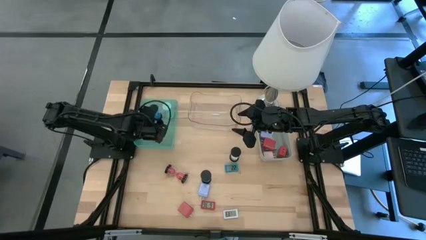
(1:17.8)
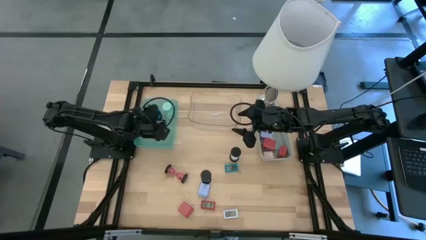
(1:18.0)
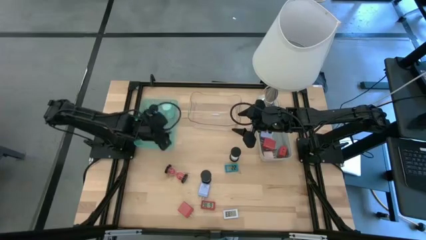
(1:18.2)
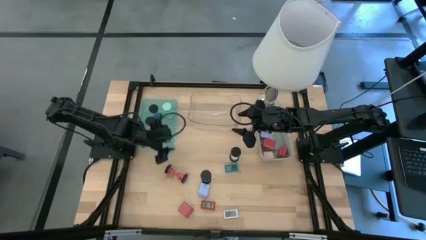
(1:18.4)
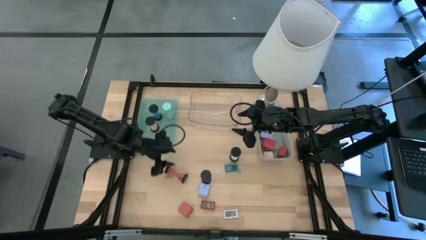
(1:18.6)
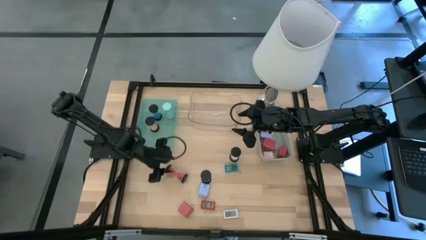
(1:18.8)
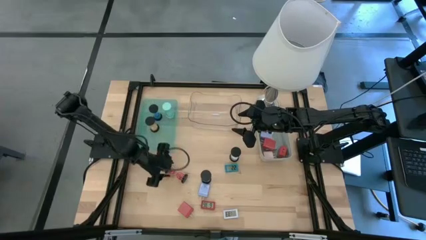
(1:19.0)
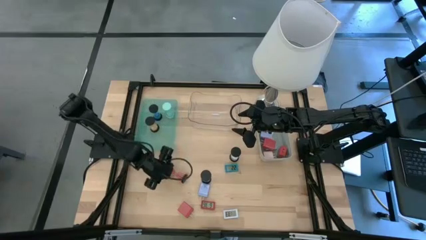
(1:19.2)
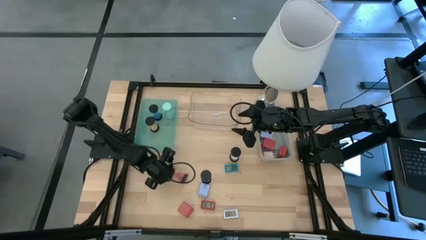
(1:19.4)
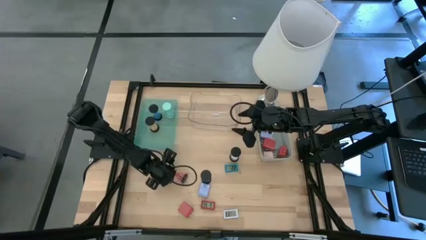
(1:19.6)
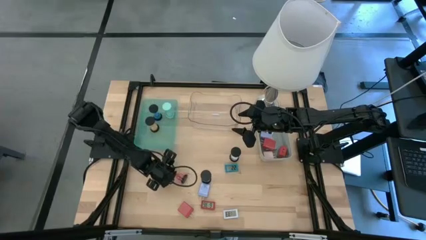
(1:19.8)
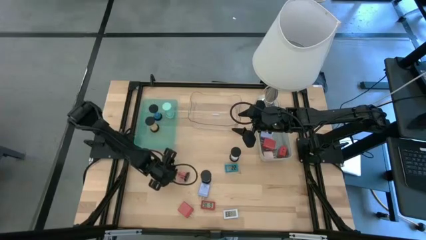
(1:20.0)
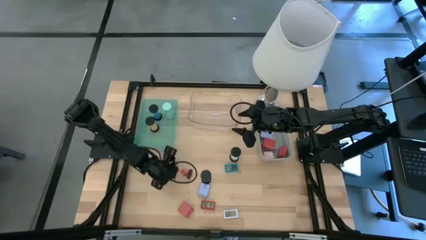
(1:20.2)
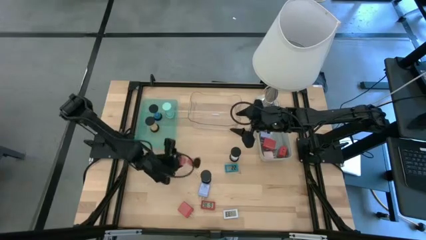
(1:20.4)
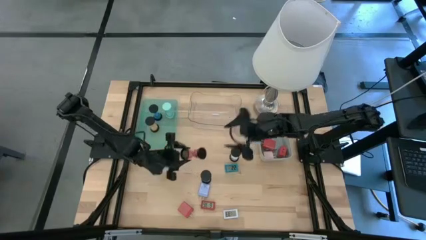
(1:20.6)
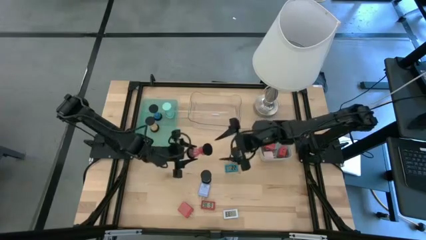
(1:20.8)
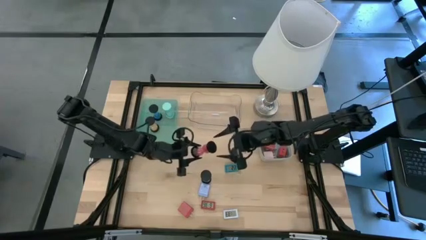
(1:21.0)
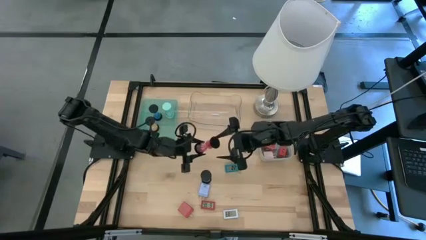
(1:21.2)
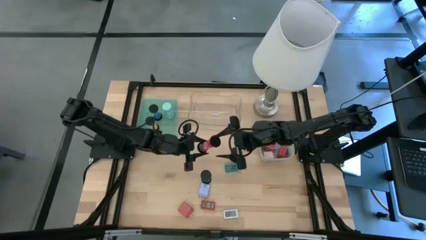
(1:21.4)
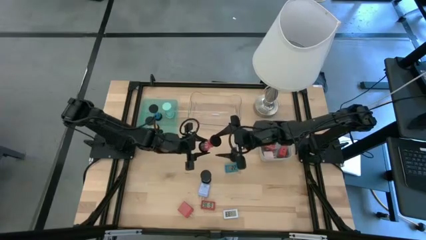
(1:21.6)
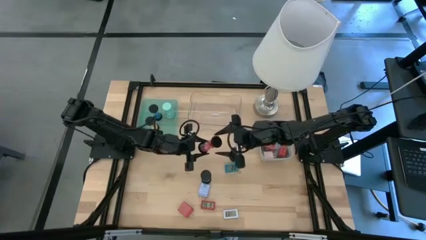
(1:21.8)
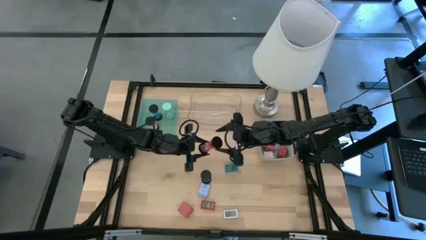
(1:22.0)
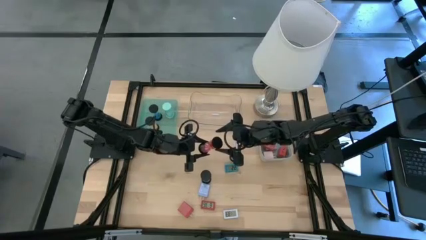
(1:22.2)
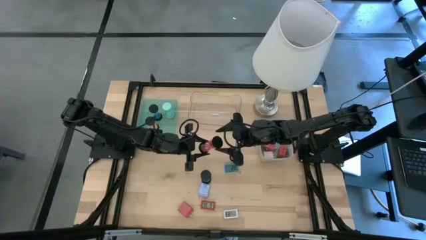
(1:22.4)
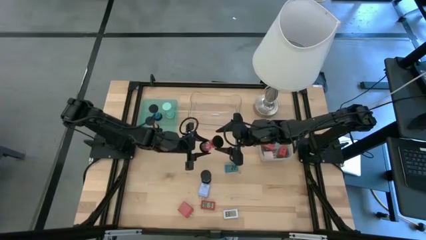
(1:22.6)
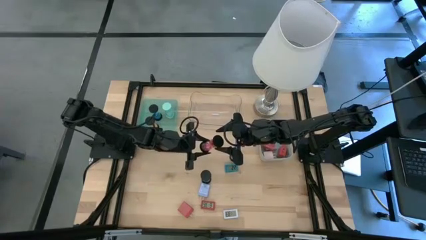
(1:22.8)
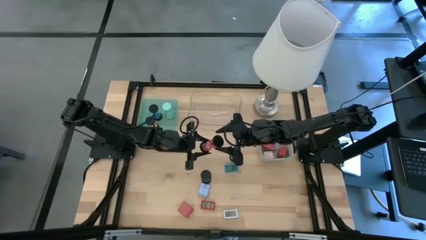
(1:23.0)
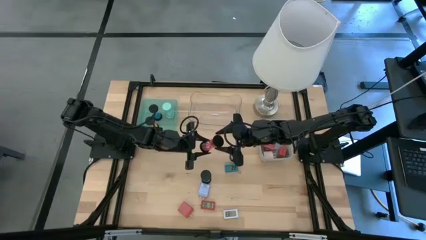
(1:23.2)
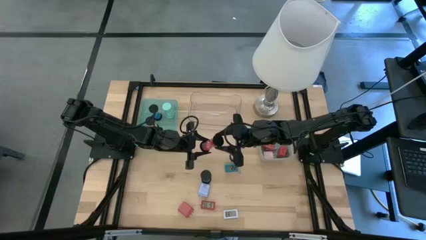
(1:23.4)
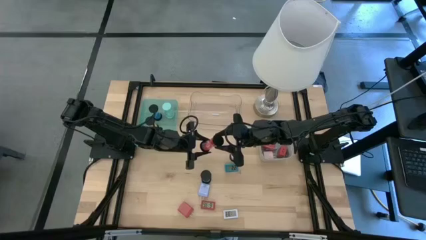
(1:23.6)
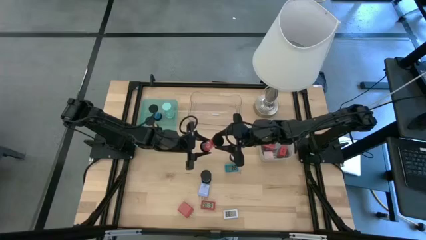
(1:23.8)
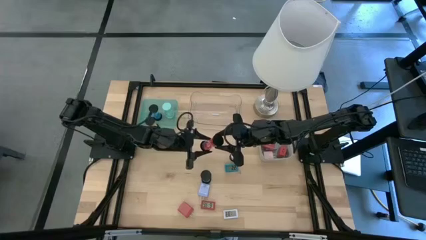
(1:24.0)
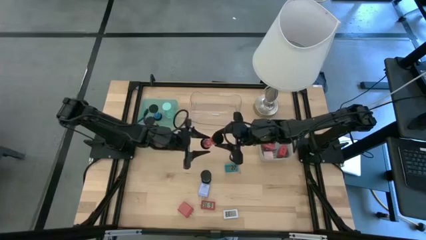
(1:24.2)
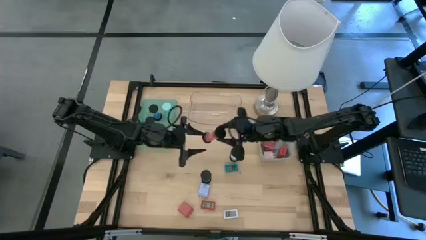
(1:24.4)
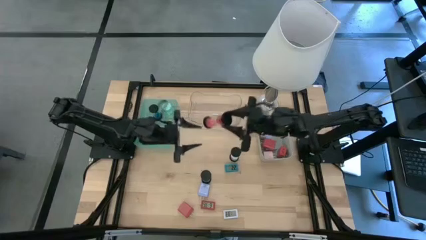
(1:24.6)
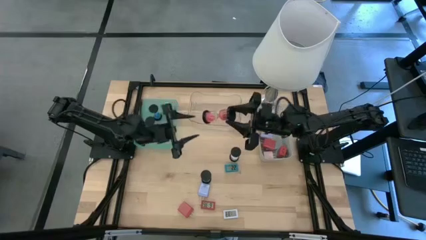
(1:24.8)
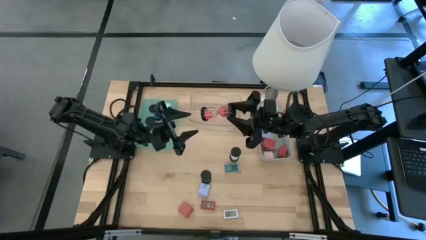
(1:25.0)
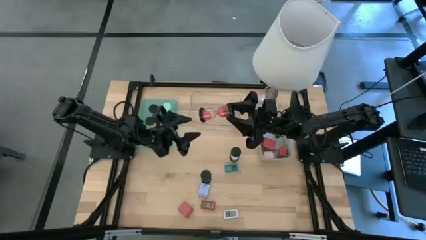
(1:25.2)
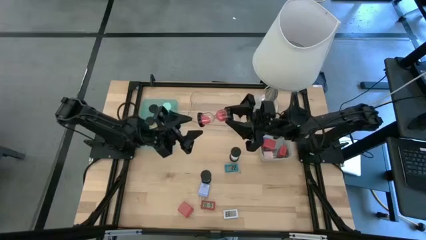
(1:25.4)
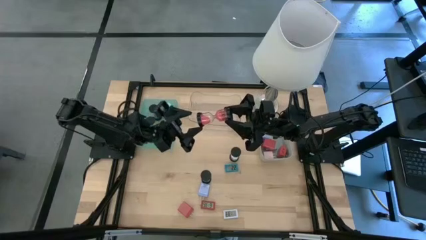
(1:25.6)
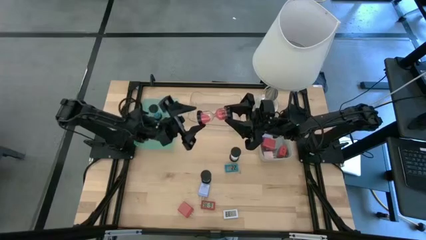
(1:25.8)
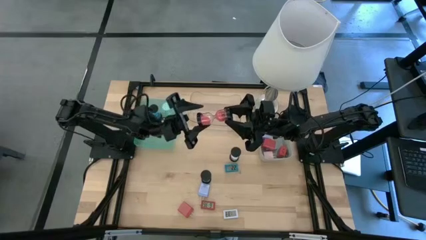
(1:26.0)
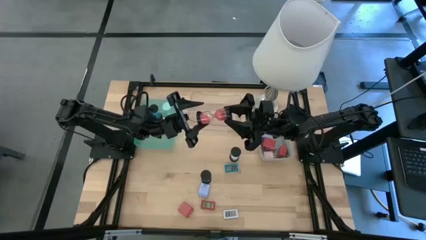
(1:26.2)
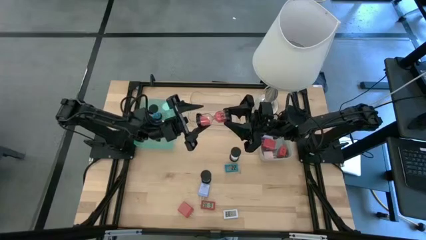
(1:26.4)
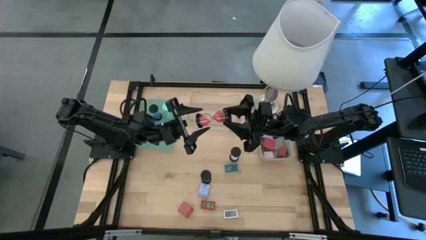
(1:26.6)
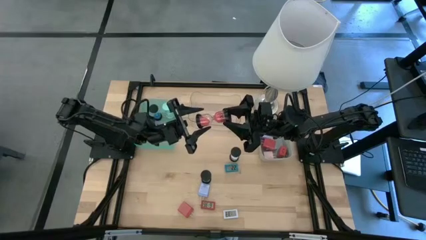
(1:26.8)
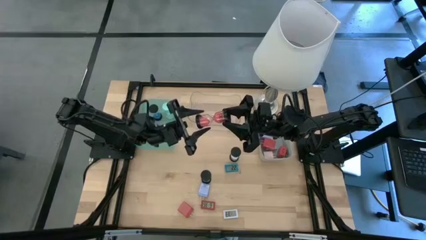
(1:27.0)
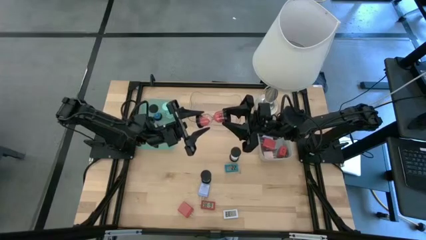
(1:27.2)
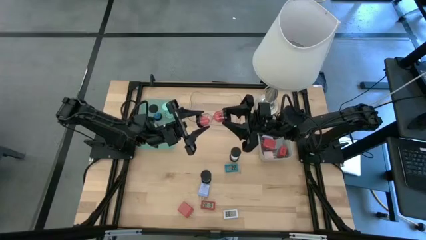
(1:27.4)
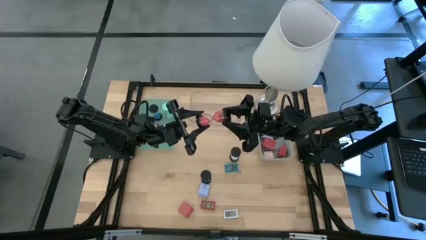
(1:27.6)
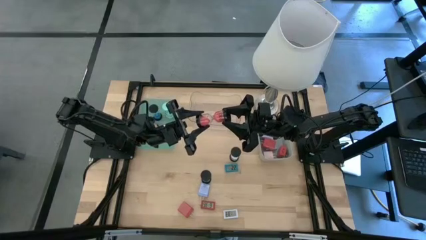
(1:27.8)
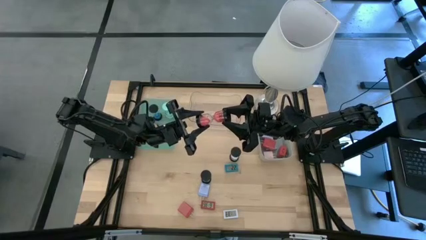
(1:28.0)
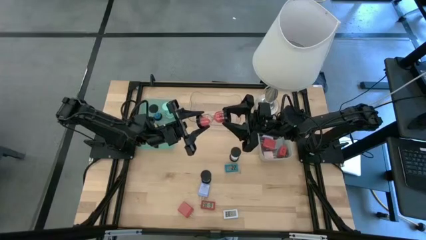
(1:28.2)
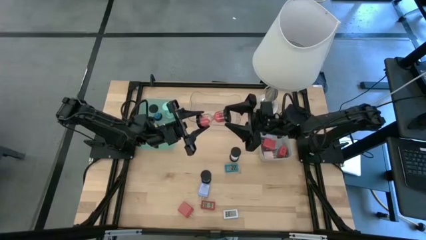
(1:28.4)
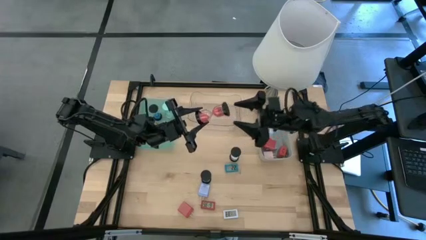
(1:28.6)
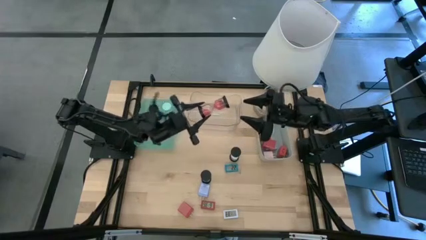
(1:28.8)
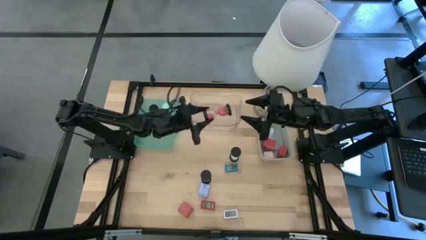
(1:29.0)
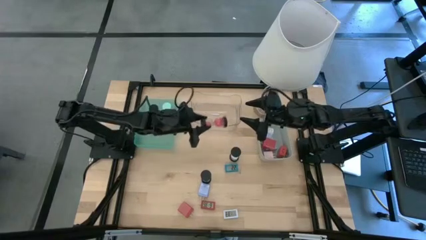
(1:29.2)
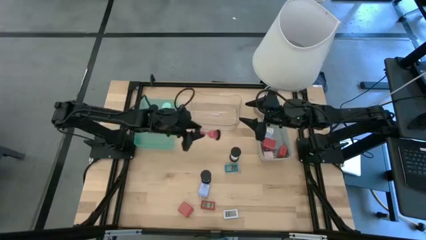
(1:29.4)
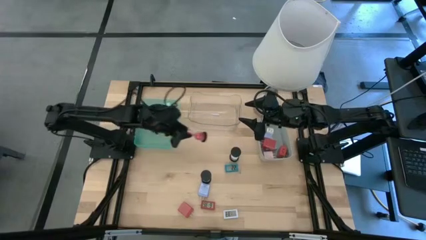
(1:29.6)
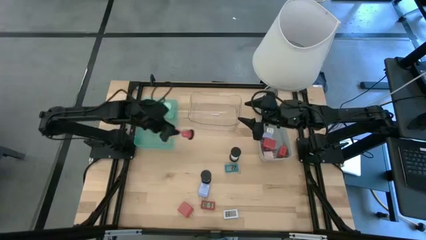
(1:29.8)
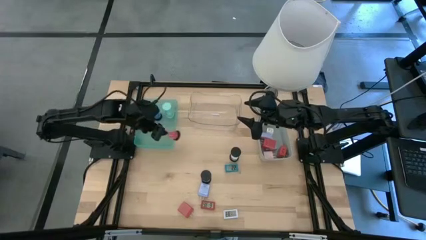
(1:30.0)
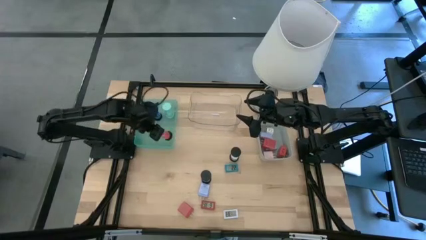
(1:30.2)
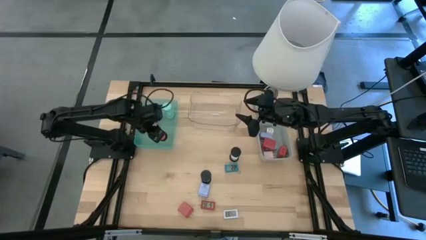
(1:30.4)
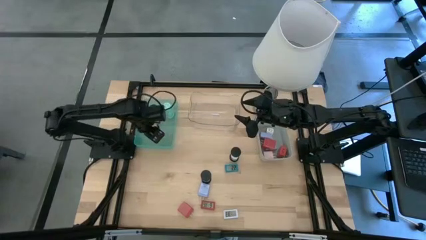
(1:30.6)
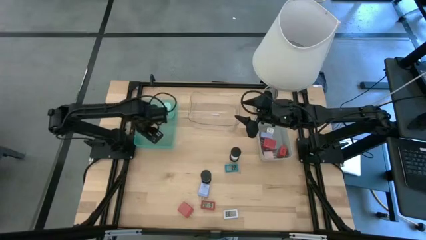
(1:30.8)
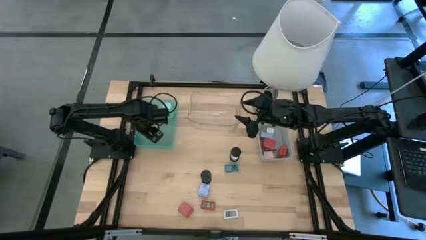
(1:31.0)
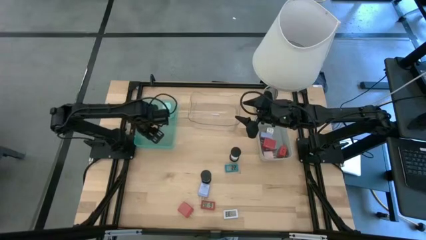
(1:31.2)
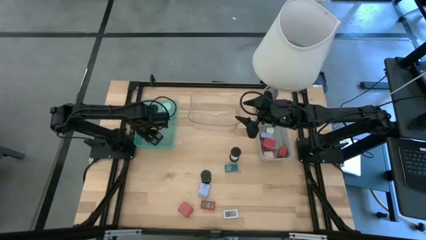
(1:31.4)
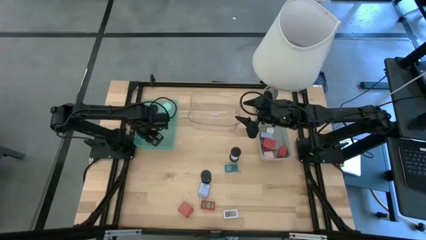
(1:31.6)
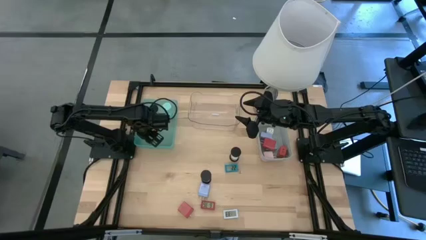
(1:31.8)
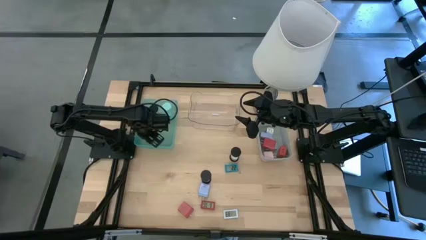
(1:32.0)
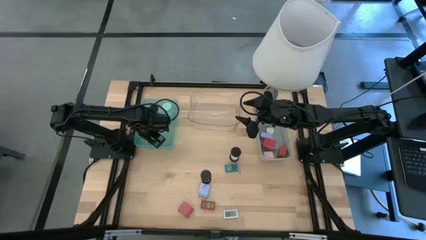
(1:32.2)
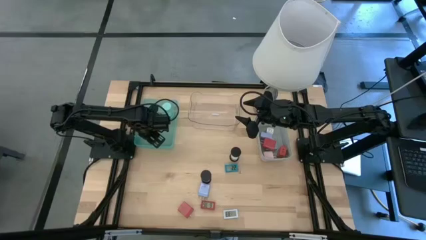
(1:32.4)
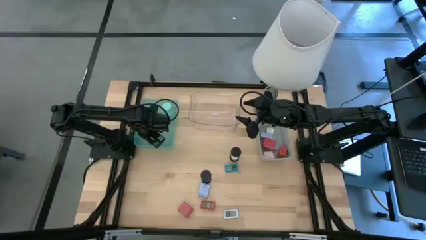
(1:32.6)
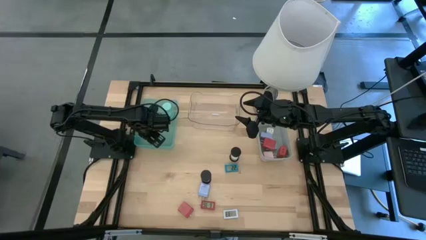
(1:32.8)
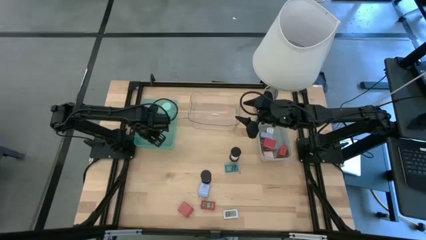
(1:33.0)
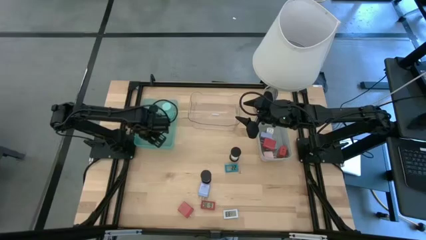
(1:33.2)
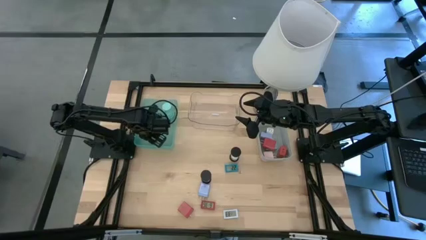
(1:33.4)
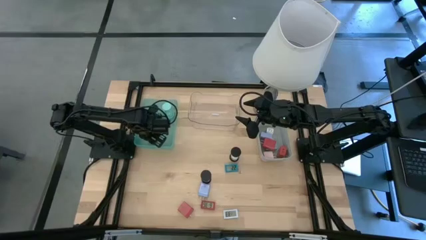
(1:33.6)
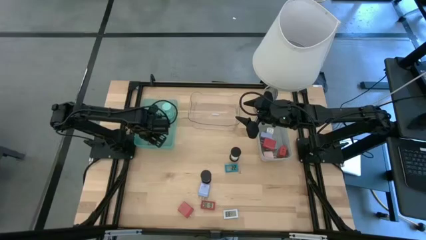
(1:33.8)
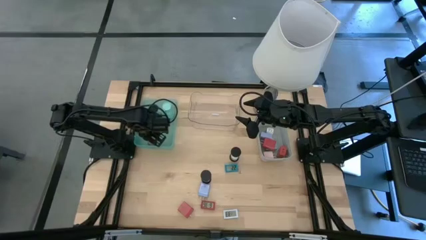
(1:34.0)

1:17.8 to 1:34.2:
Task: Pick & Place Office items
Put the black and red hourglass into the green bin
